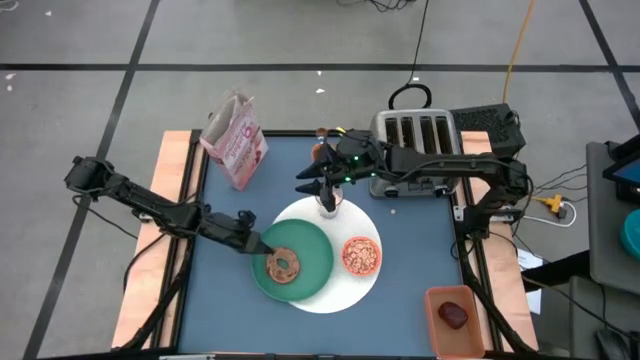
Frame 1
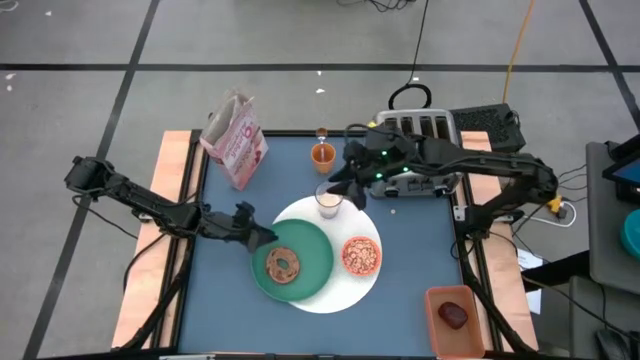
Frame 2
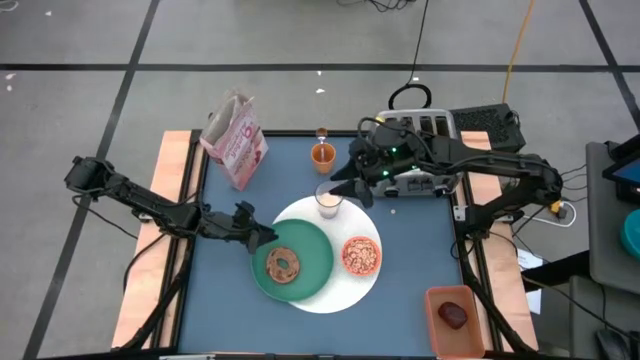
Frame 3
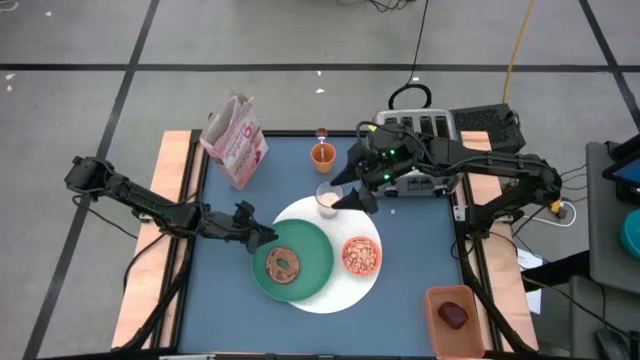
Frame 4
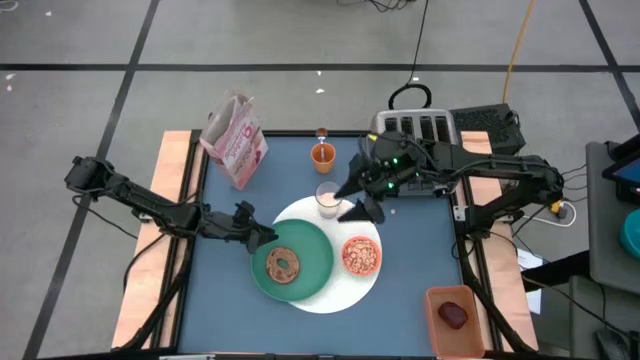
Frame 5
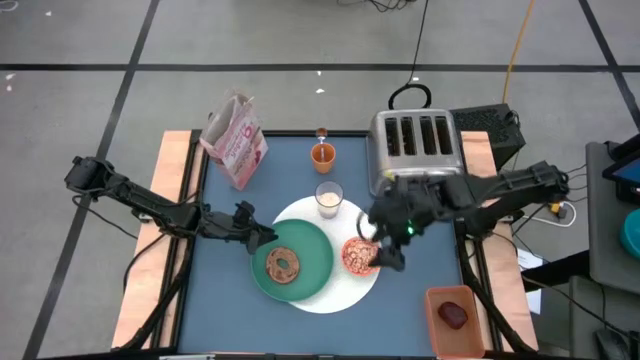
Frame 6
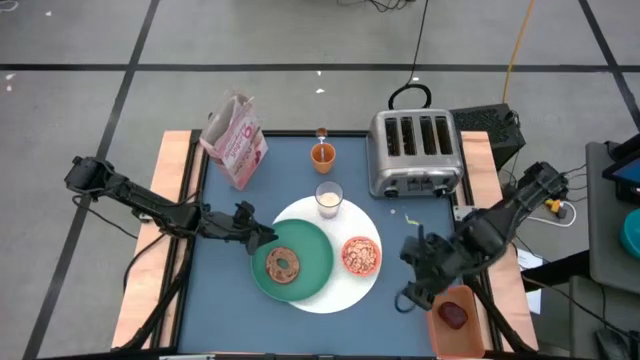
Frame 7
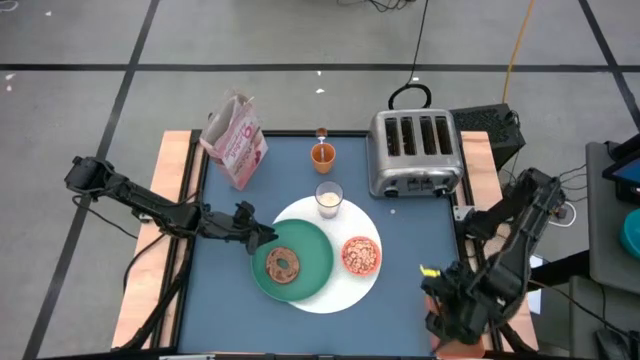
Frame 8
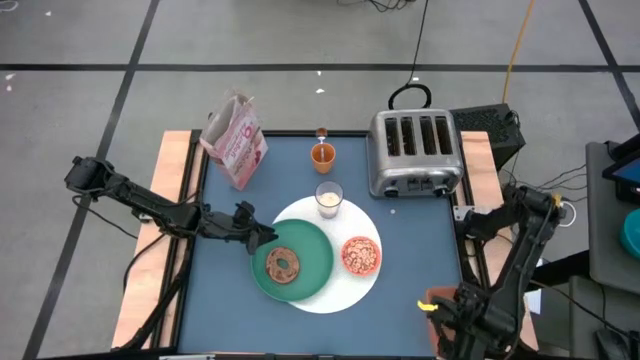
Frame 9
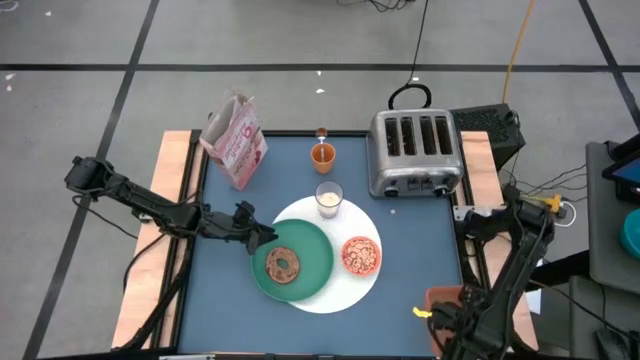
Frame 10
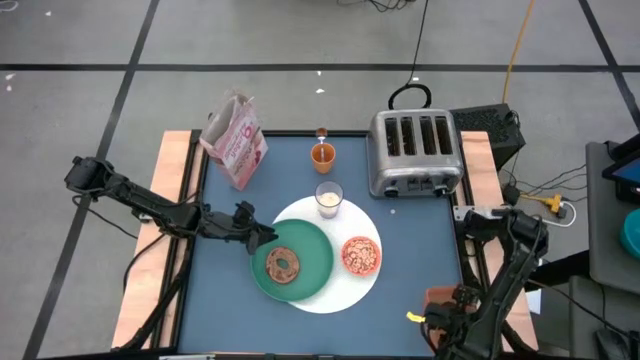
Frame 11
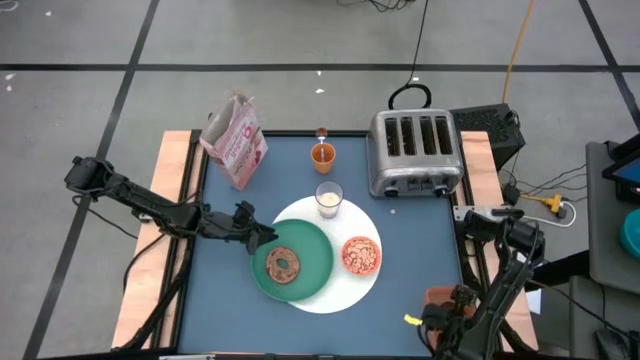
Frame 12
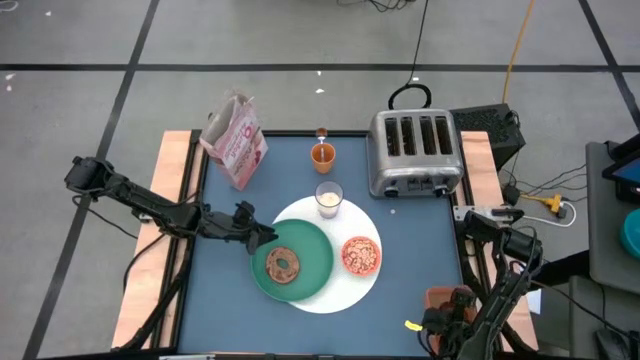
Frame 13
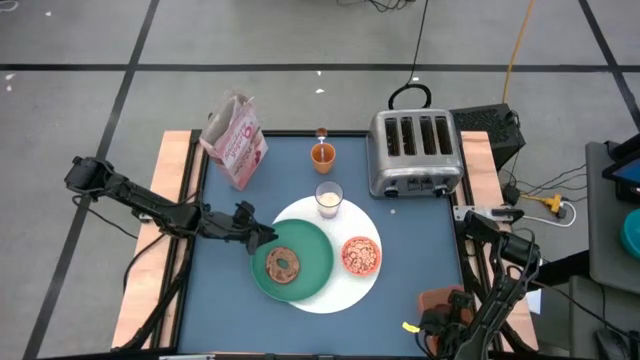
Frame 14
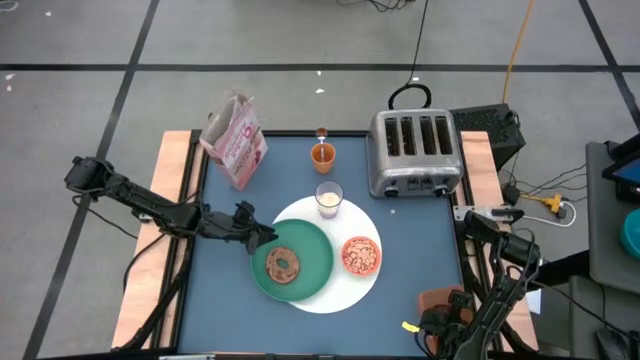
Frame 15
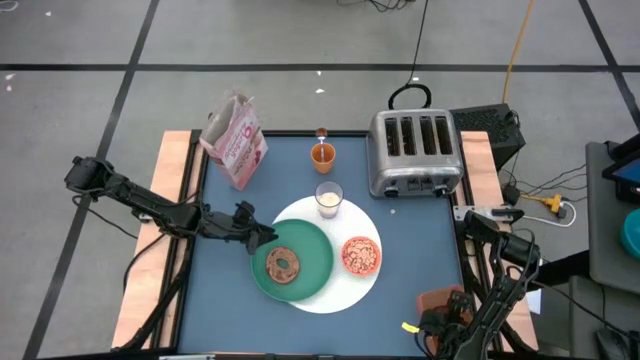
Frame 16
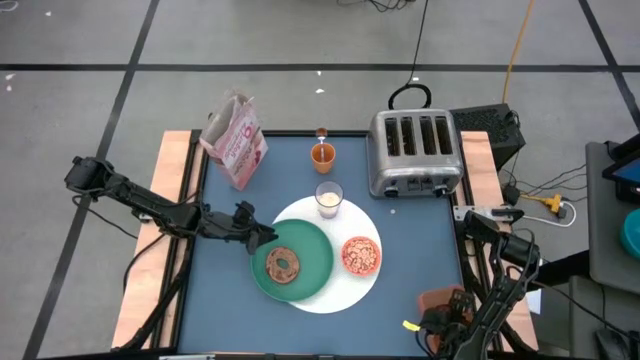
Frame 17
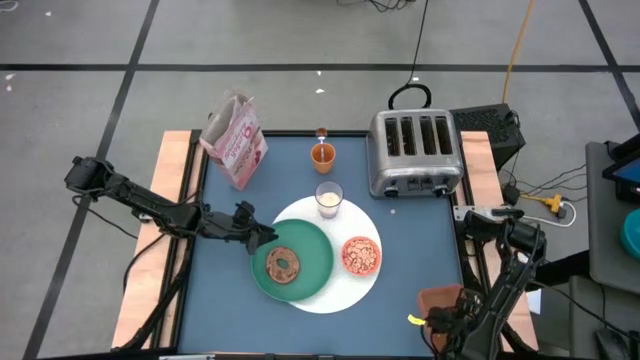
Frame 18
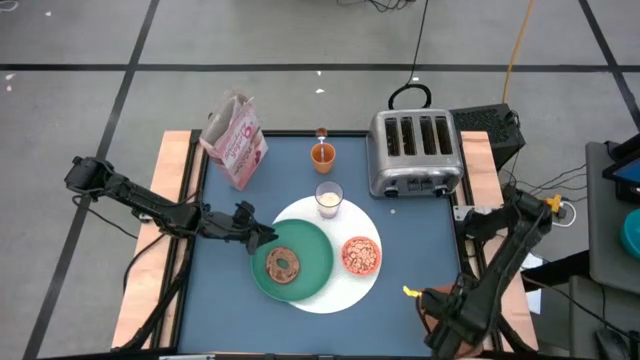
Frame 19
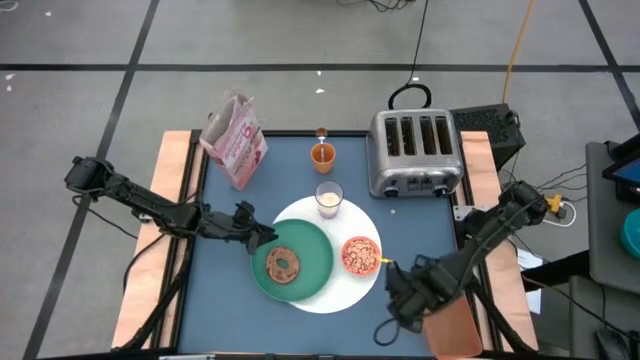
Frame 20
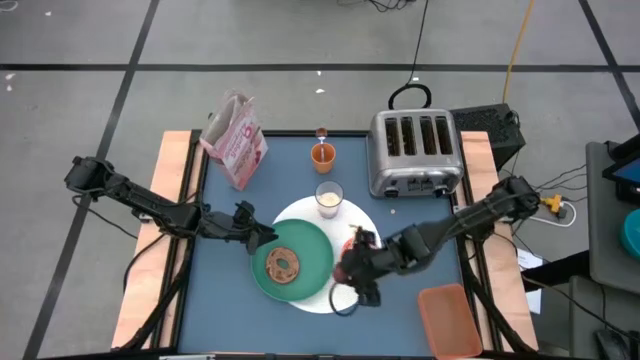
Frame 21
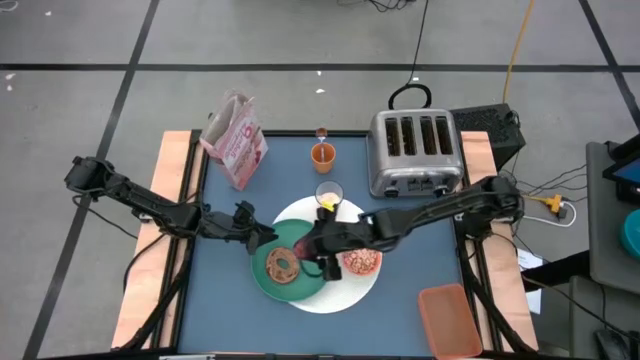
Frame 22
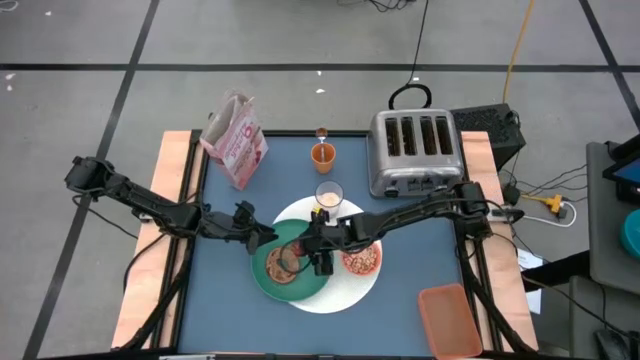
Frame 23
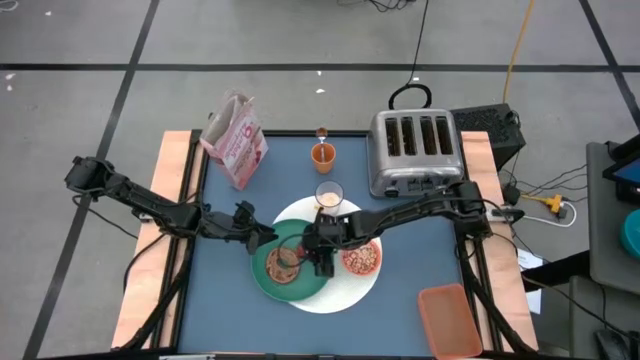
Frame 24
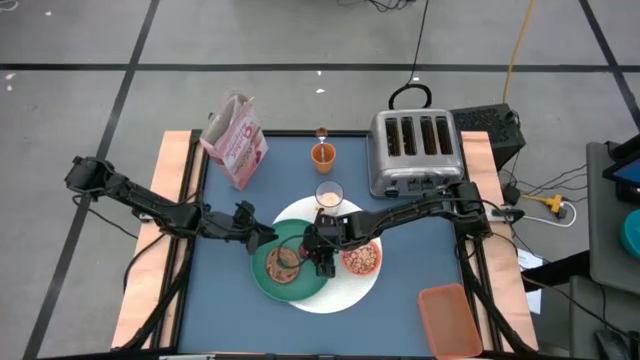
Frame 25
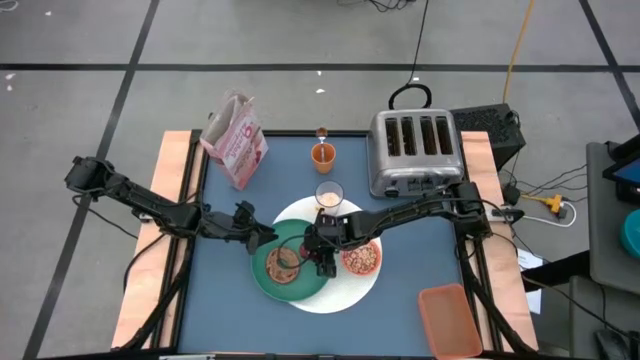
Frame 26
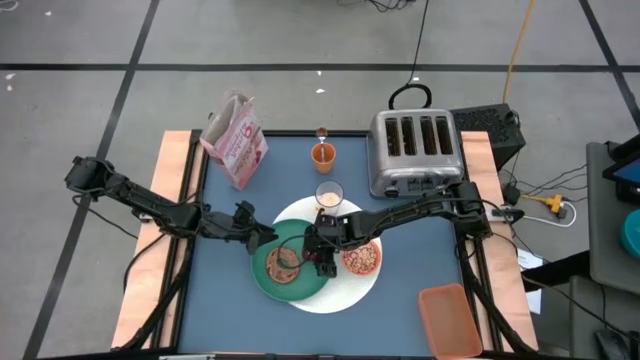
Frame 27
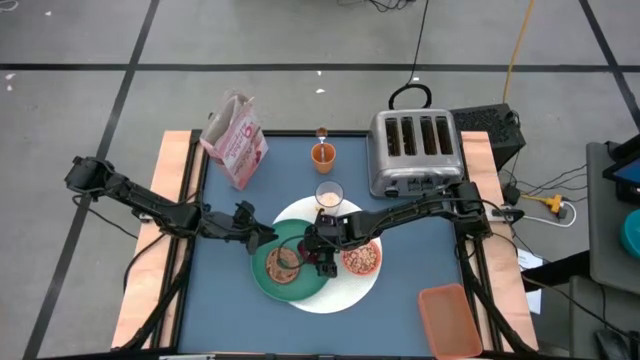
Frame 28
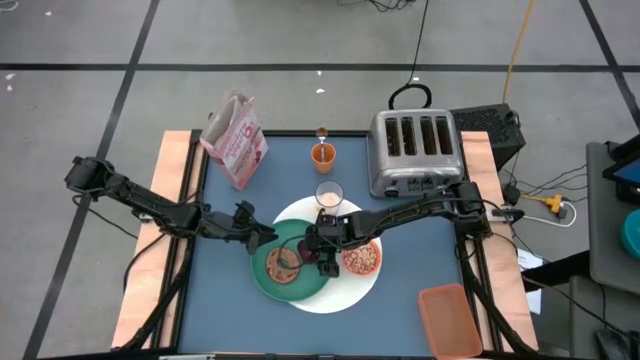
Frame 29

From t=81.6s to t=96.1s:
Task: Arrange a breakfast setting
Put the apple on the green plate

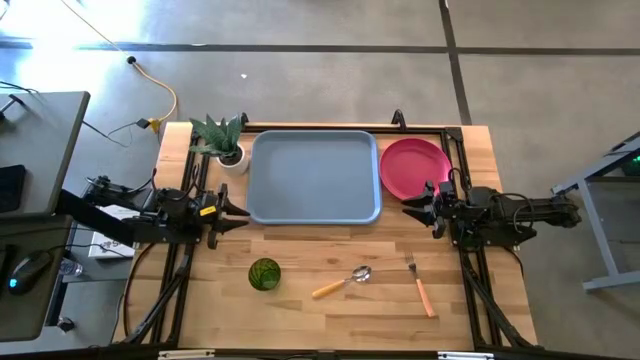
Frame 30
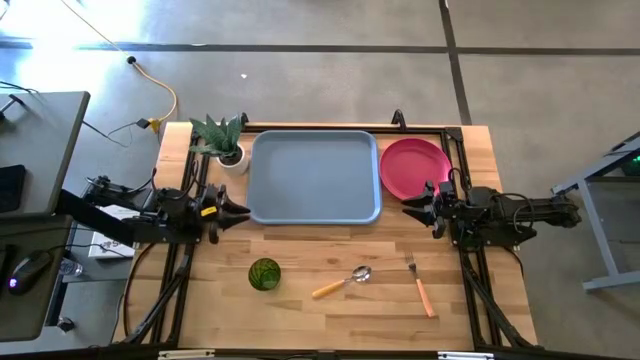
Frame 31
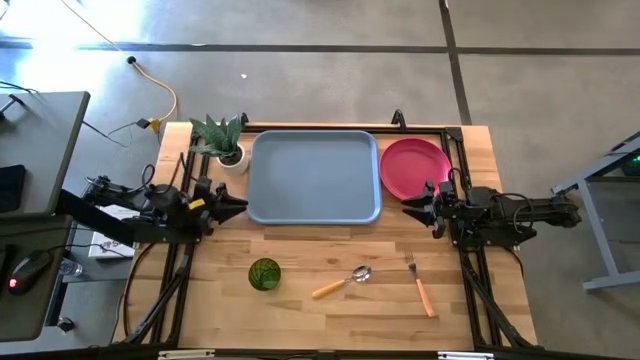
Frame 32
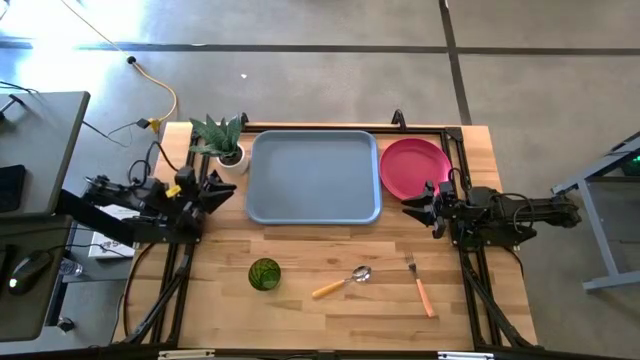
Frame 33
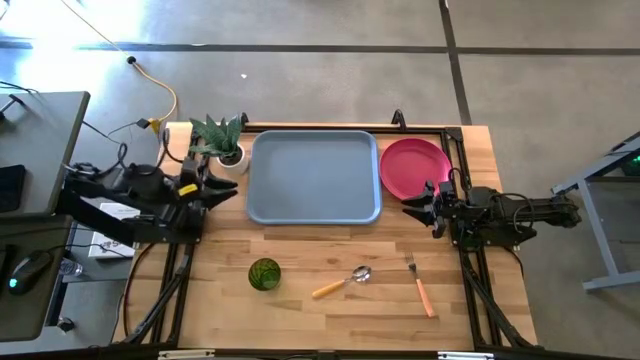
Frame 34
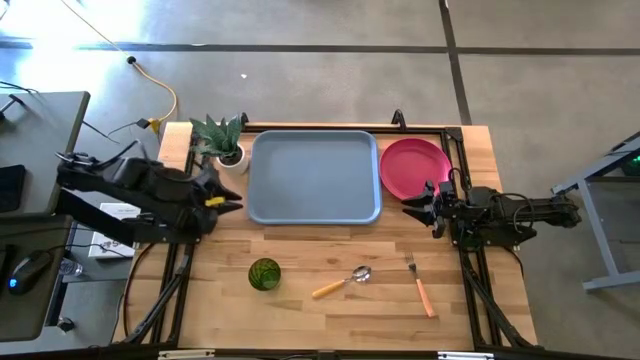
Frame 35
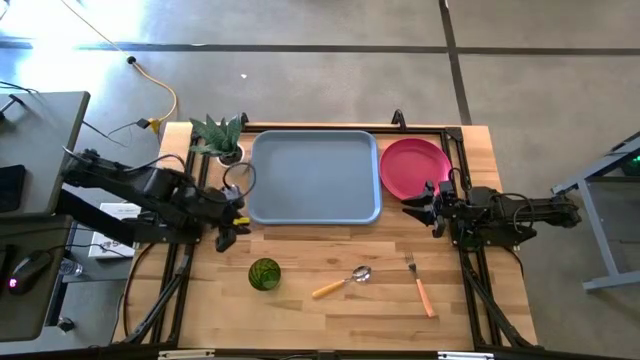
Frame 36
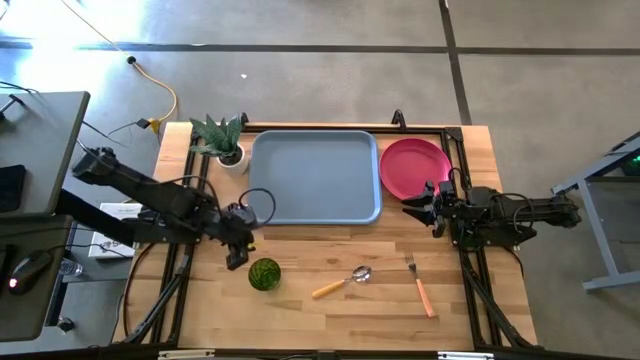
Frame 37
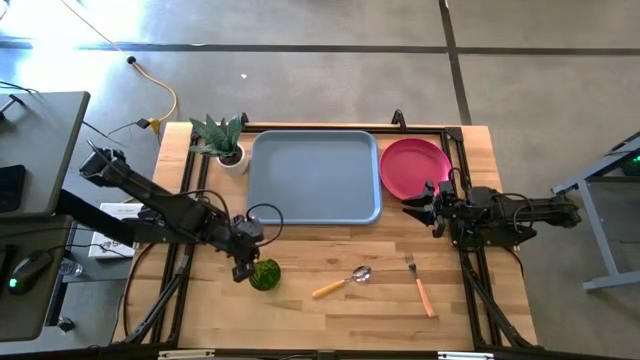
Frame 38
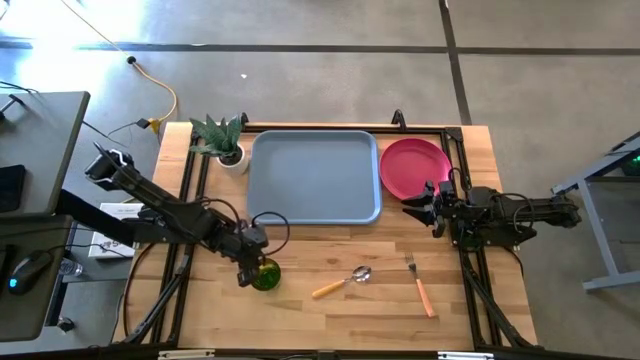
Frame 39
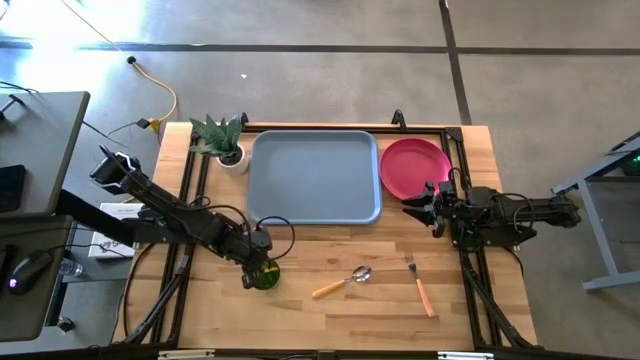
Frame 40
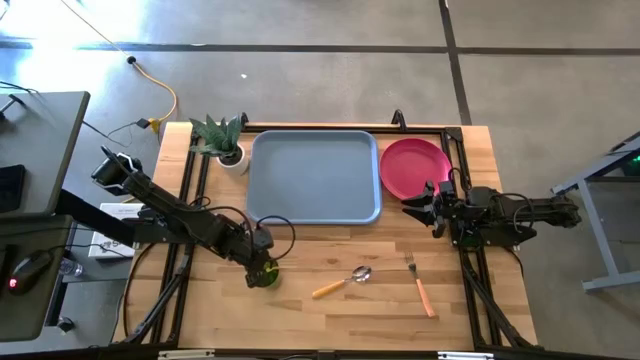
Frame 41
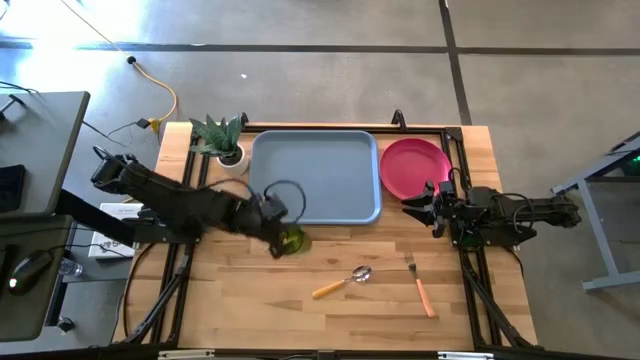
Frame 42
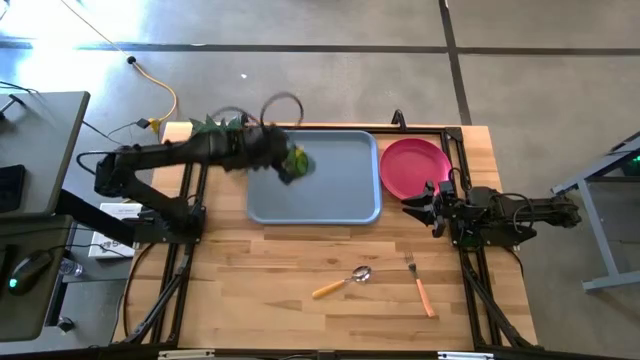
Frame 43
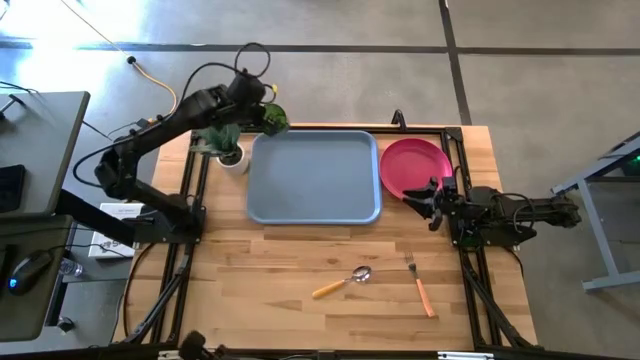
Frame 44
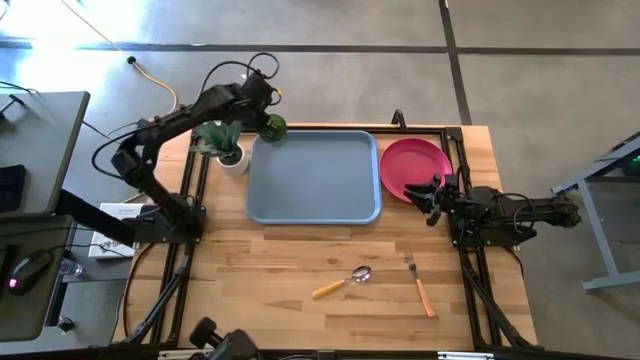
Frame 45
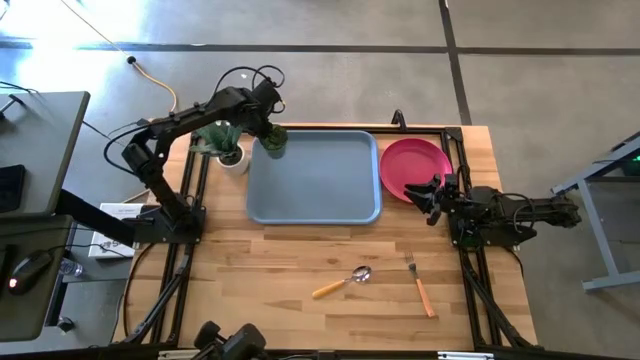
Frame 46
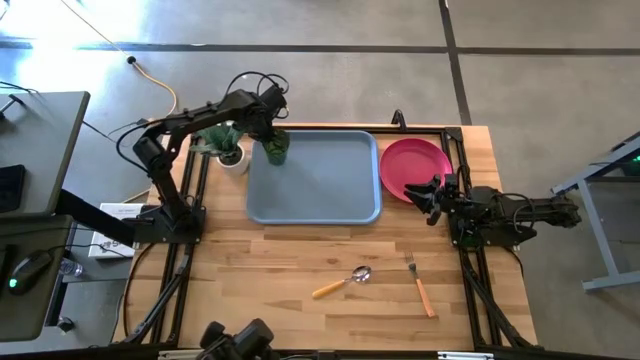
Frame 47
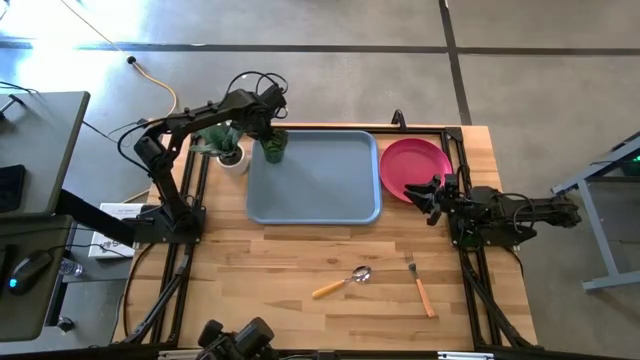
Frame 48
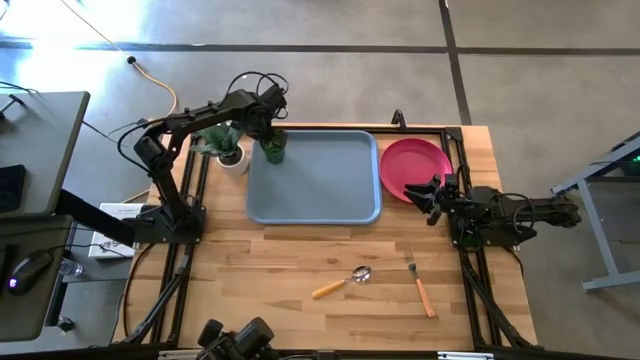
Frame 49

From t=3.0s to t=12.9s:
Task: Pick and place plate/cup/fork/spoon on tray
Put the green cup on the top left of the blue tray
